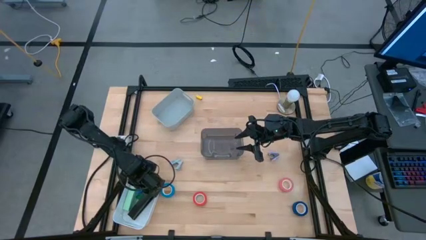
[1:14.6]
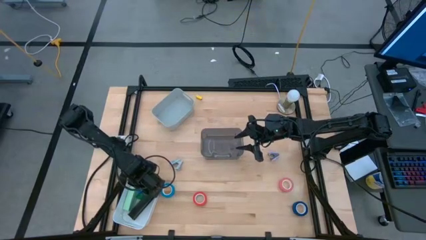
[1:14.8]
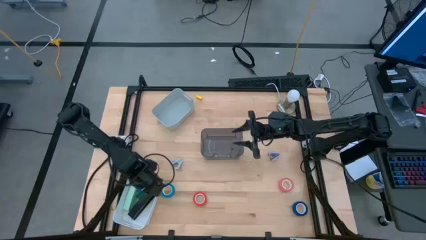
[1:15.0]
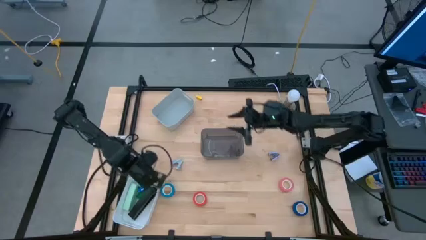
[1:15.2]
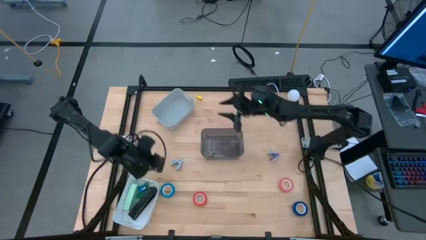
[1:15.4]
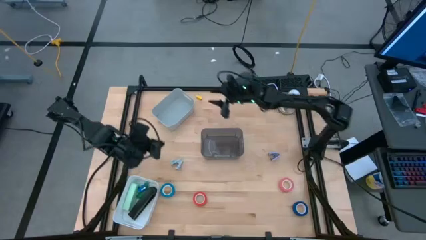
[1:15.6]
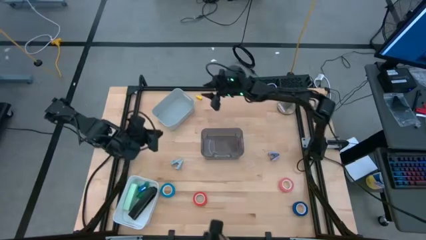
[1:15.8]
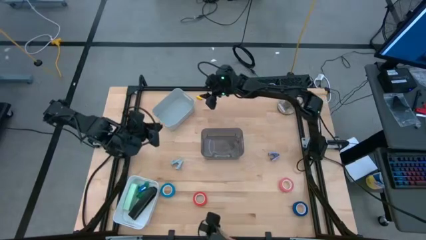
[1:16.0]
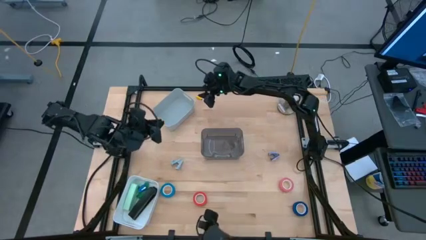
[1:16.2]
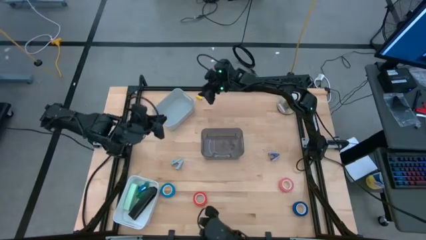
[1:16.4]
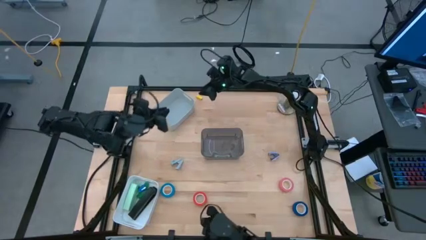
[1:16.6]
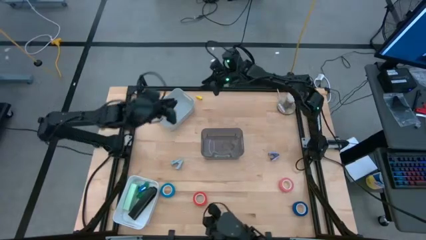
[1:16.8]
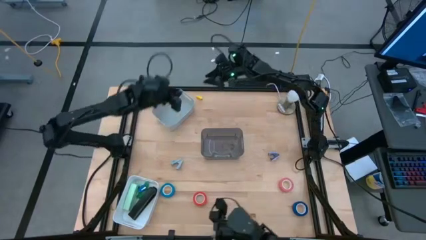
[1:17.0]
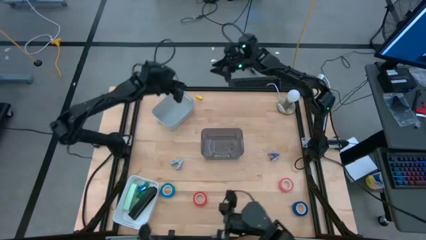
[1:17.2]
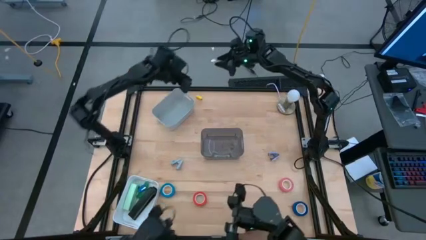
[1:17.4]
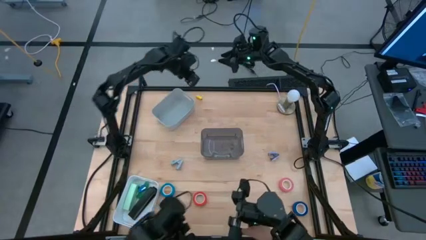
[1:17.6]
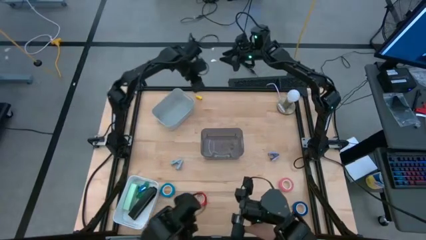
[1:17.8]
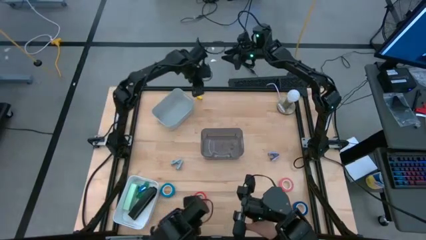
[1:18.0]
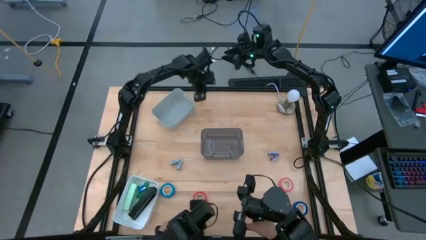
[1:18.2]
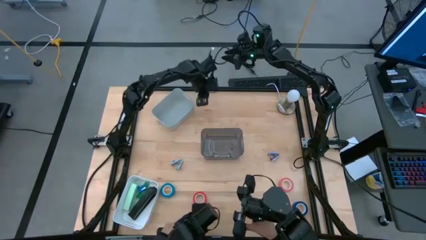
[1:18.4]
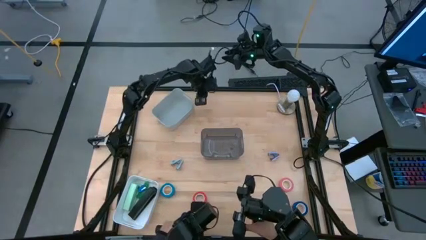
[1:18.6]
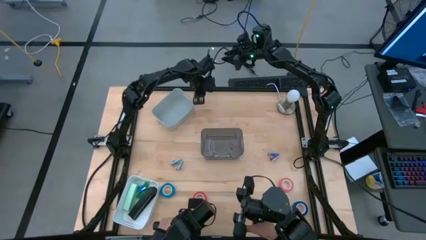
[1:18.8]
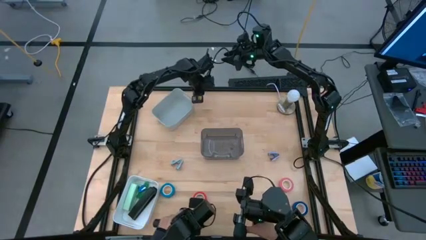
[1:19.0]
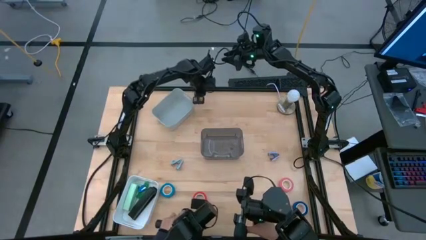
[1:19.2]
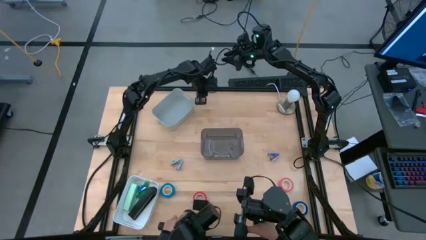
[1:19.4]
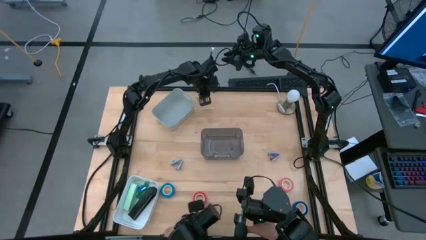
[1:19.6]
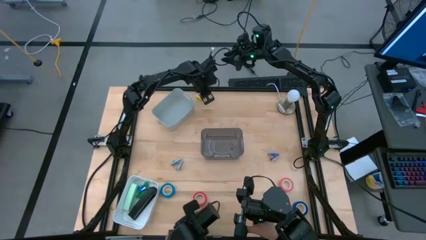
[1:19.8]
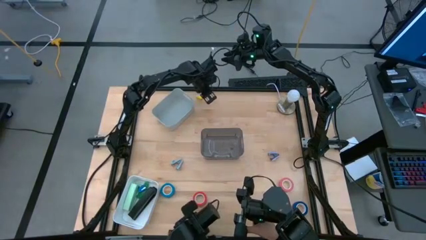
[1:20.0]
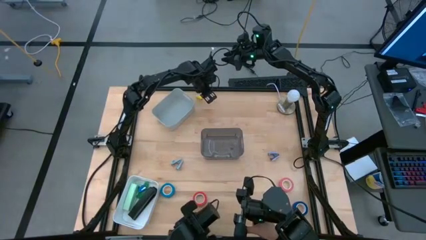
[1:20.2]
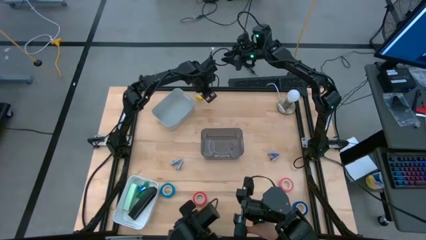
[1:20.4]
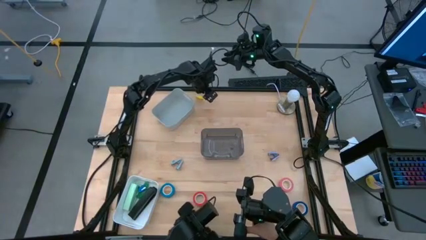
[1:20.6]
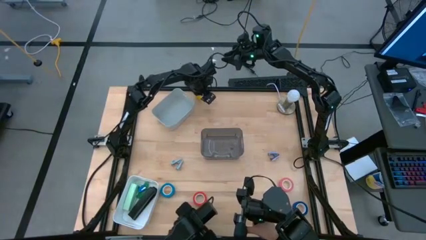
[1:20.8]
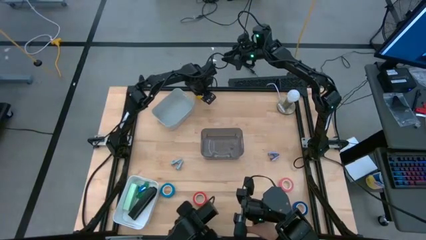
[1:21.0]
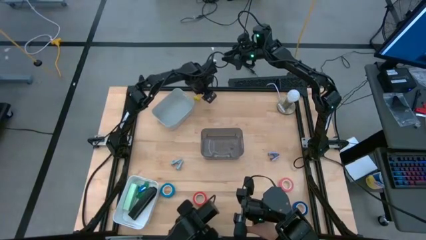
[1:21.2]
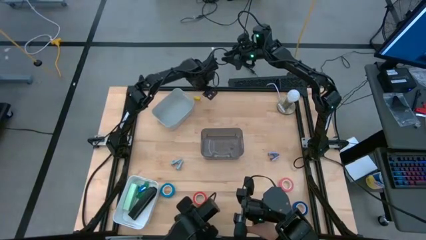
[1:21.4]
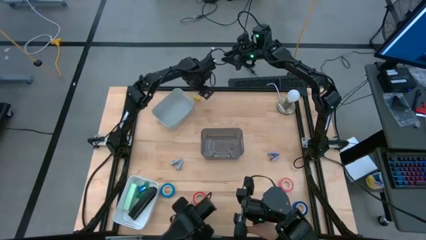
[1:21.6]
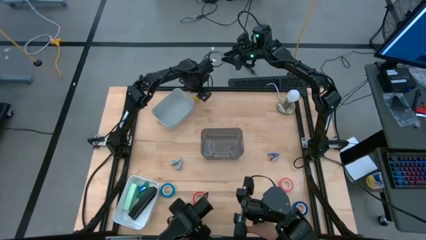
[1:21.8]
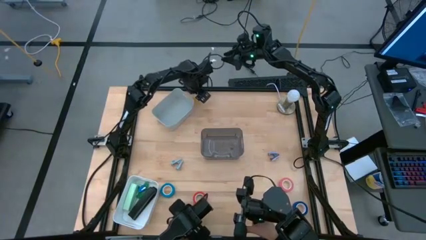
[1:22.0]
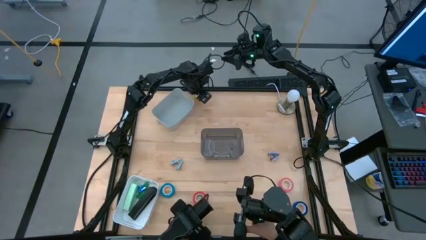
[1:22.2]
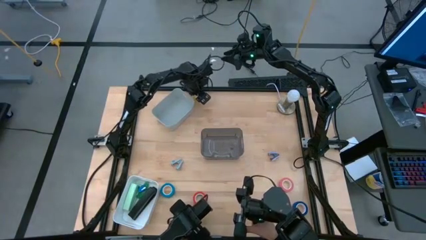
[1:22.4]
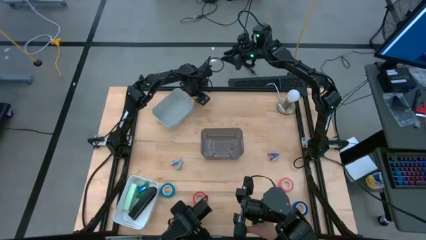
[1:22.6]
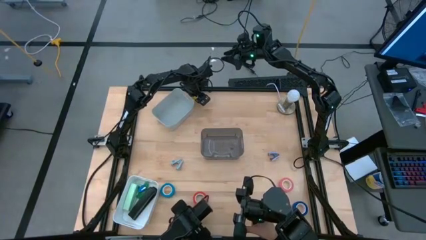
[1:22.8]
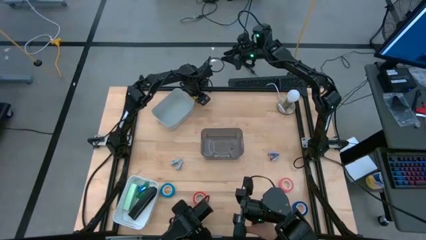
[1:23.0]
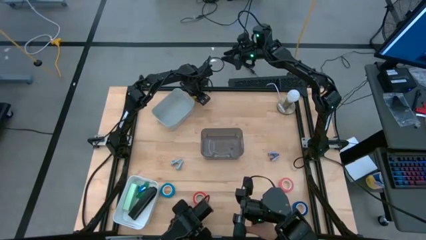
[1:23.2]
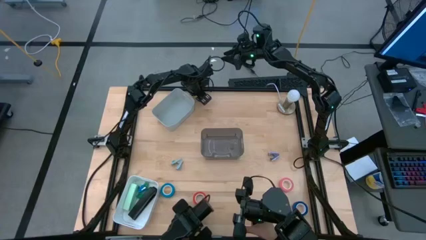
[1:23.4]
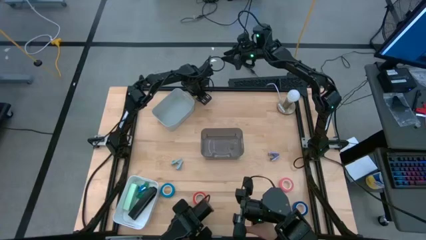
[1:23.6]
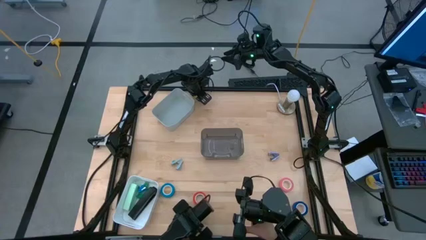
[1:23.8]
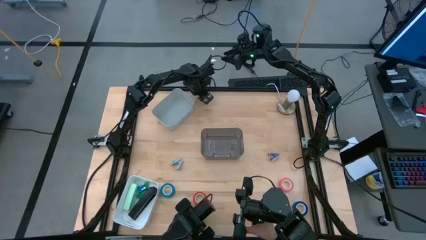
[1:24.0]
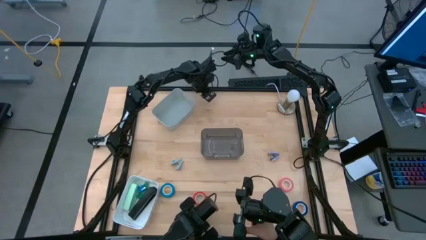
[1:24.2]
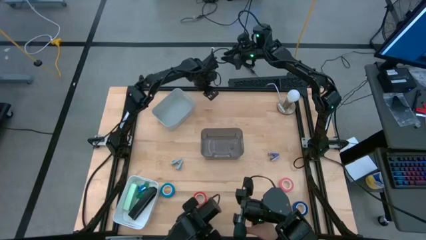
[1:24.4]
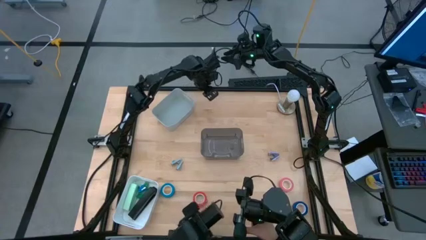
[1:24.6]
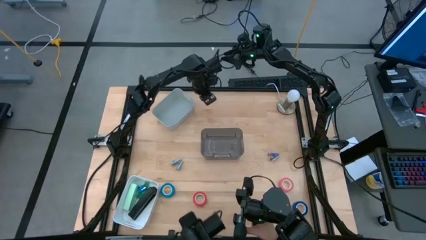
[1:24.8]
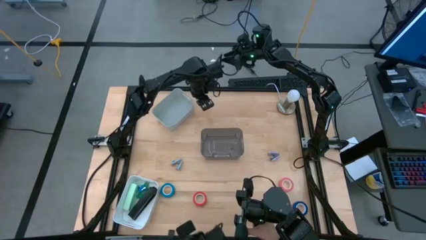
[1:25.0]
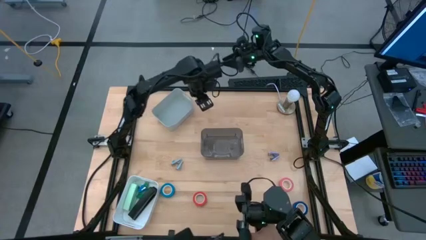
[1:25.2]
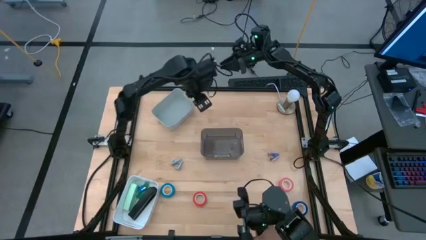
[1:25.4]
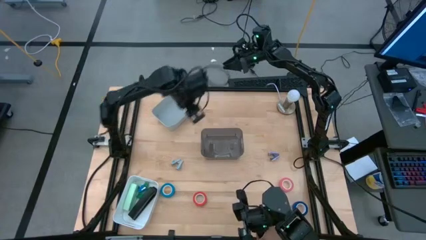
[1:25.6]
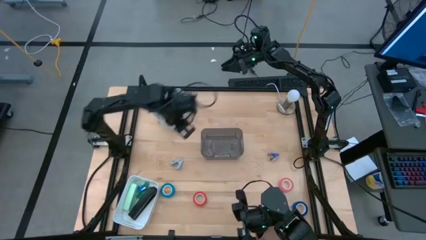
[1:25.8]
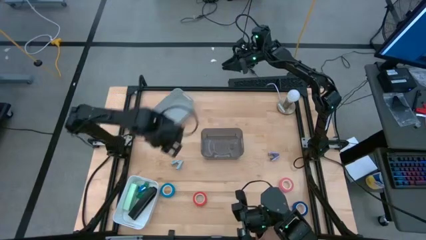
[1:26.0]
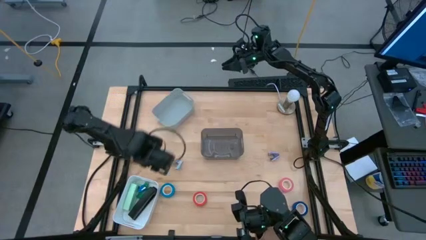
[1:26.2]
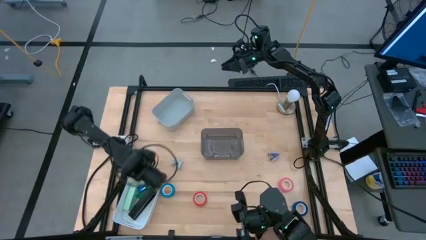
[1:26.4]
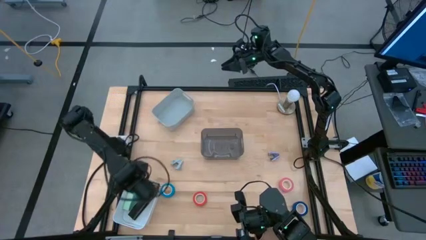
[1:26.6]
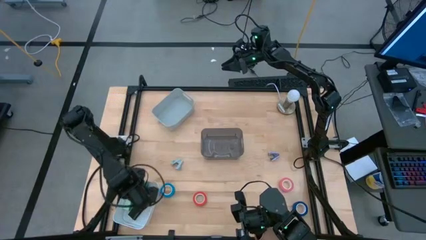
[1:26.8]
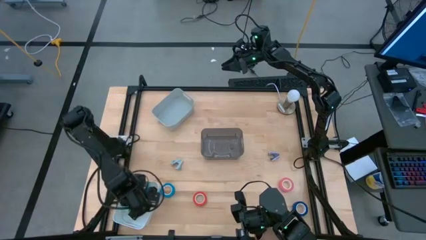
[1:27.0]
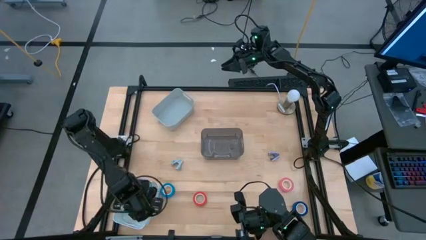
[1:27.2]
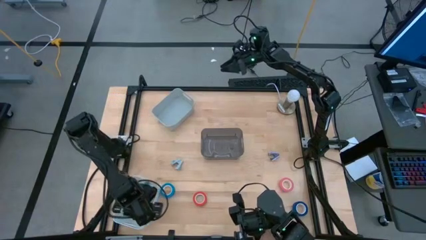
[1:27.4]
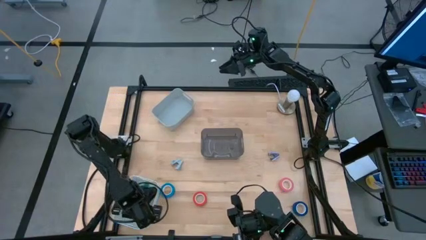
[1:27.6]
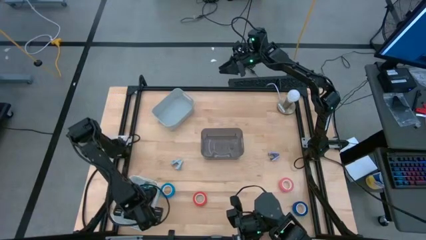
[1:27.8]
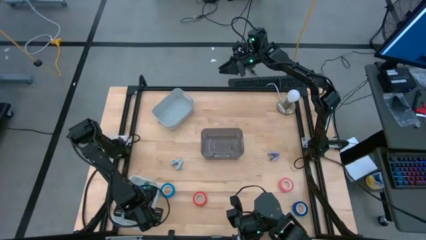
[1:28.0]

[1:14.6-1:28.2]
Task: Pick and place Stapler, Stapler remover, tape
Put the yellow stapler into the white bin

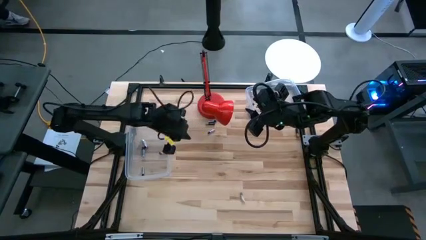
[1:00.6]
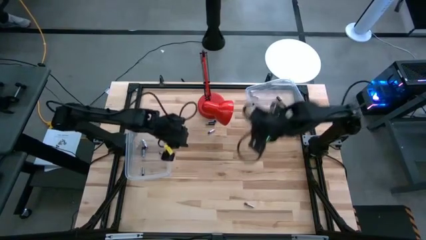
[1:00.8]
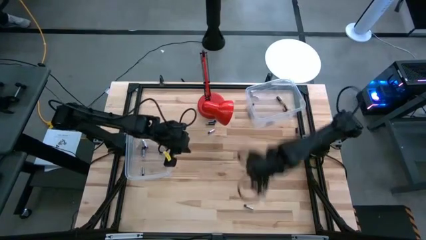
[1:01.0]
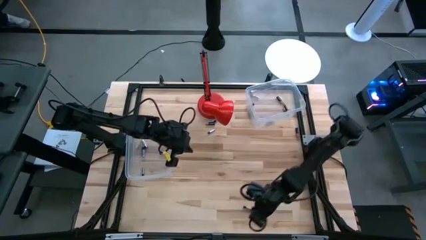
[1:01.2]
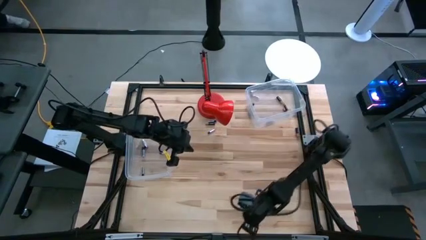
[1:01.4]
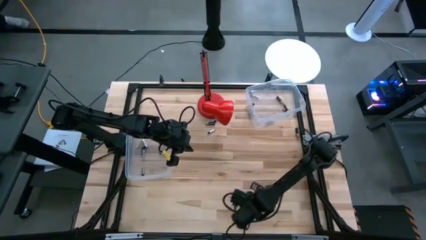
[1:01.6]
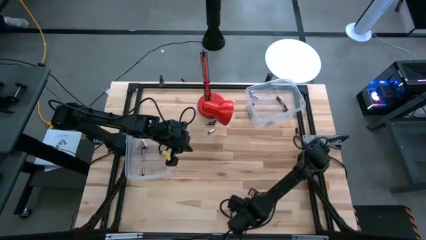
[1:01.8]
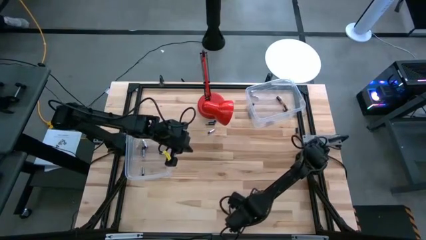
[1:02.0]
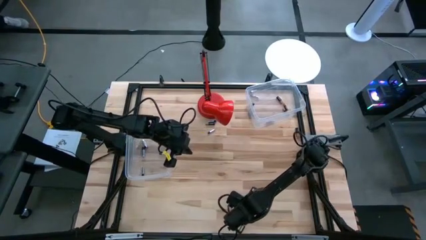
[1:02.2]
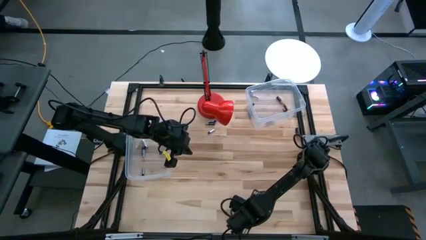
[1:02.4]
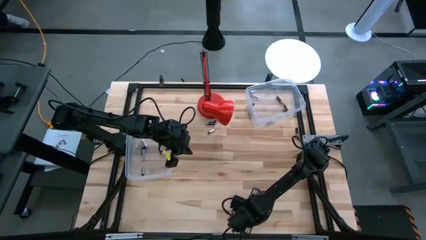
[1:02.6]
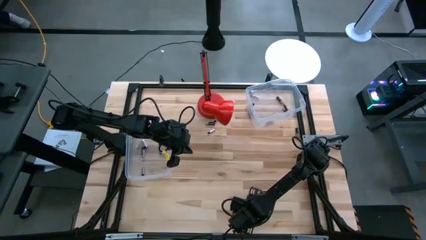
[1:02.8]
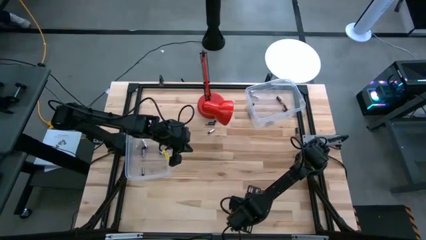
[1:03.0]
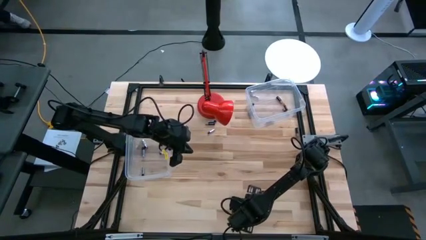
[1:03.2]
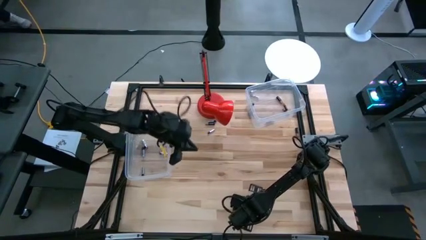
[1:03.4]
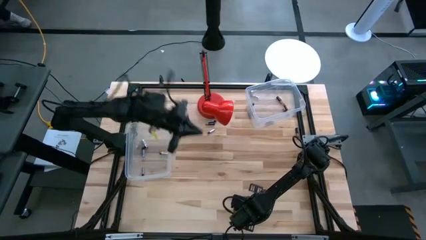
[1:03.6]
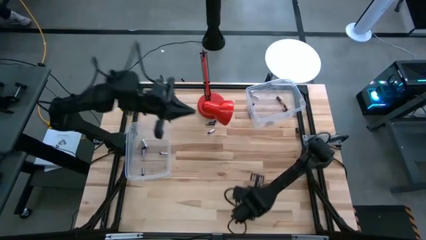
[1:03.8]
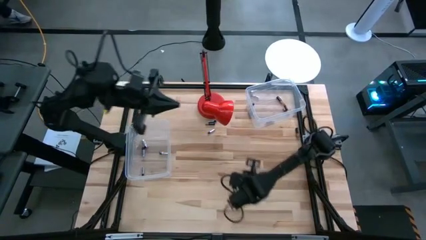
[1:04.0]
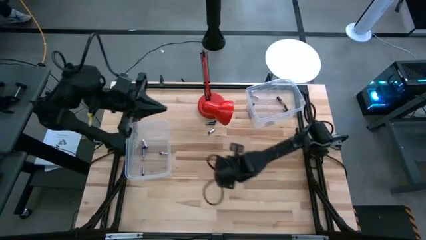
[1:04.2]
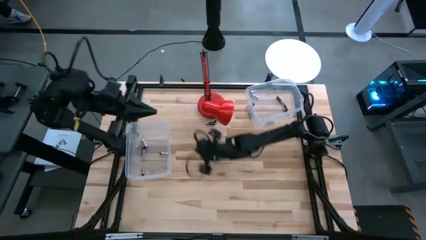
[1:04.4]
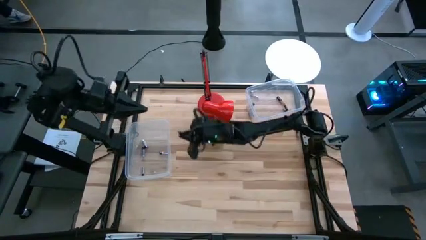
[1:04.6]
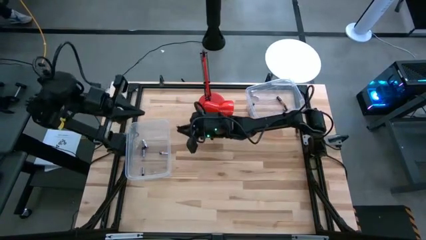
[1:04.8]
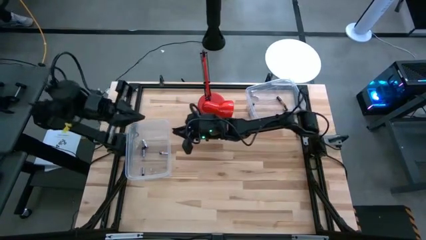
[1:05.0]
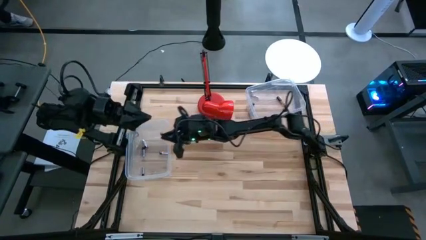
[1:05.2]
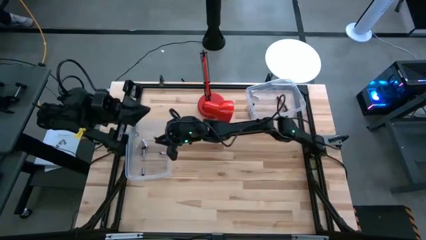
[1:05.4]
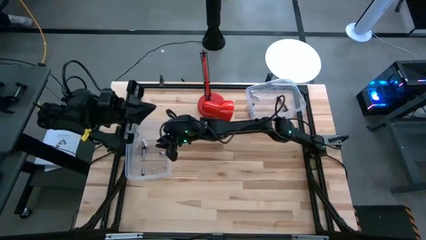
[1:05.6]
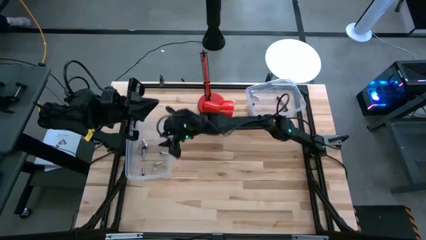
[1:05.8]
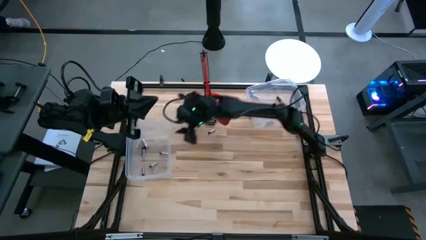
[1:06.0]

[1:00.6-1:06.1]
Task: Sort batteries
Put the silver battery into the bottom transparent bin
